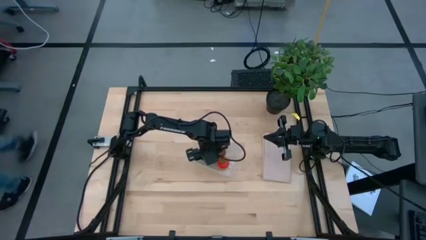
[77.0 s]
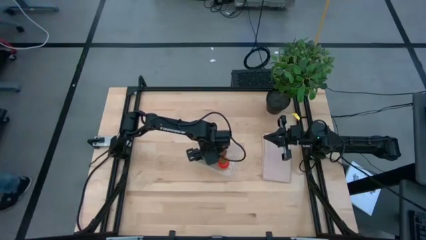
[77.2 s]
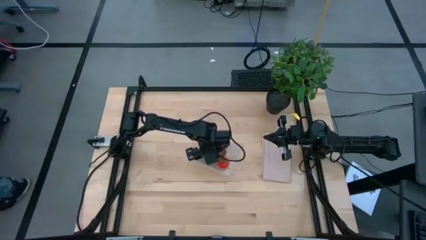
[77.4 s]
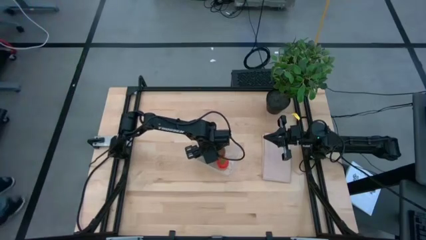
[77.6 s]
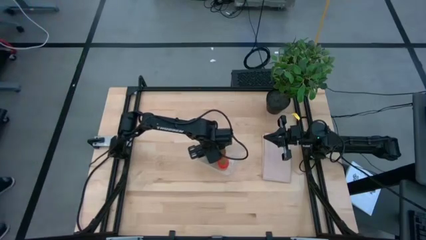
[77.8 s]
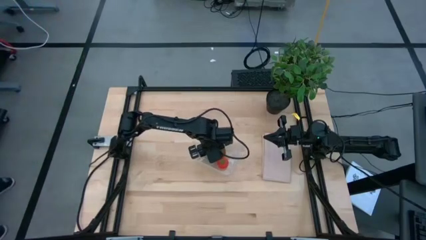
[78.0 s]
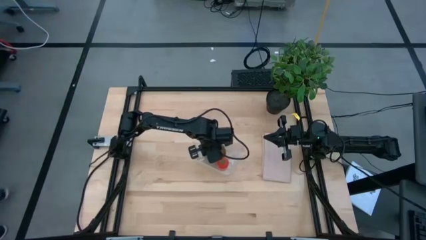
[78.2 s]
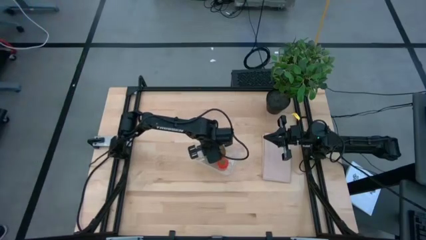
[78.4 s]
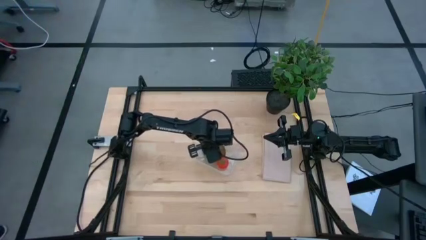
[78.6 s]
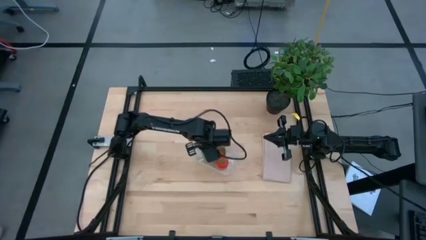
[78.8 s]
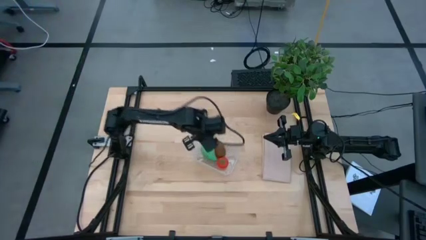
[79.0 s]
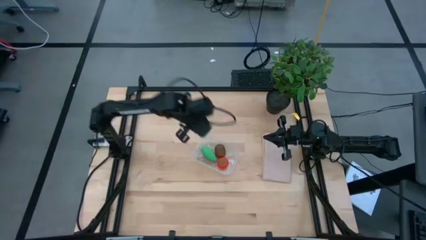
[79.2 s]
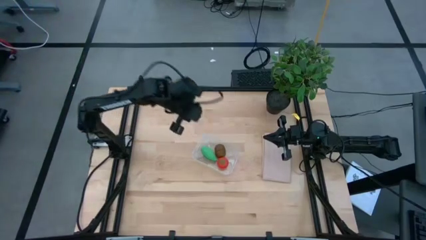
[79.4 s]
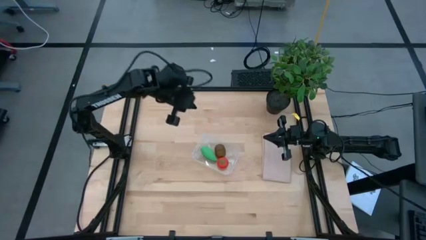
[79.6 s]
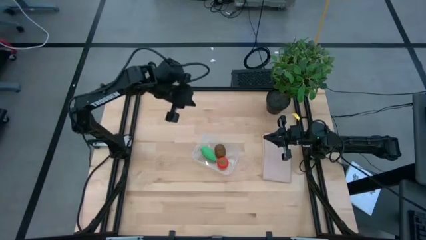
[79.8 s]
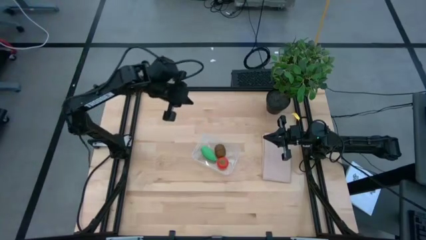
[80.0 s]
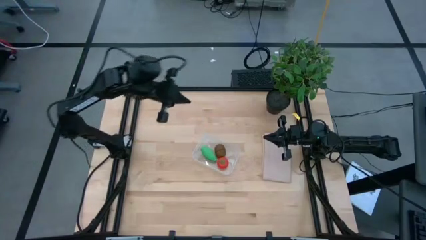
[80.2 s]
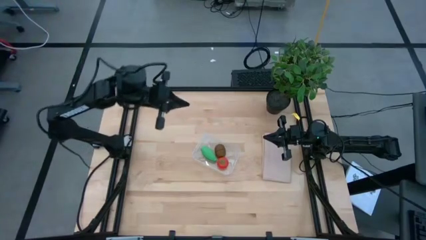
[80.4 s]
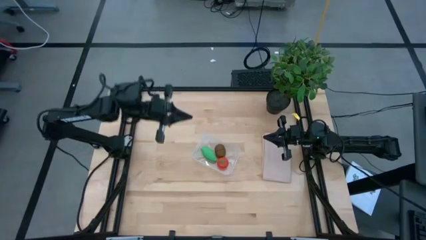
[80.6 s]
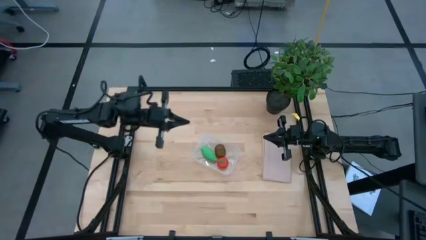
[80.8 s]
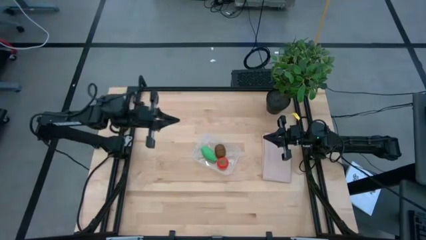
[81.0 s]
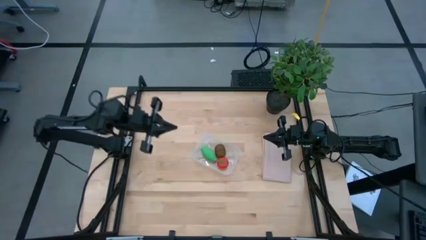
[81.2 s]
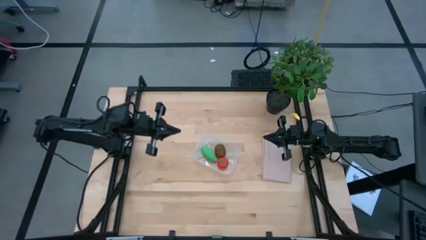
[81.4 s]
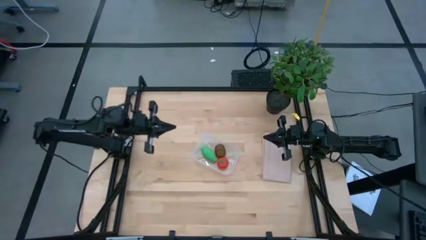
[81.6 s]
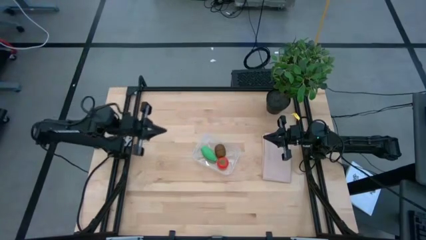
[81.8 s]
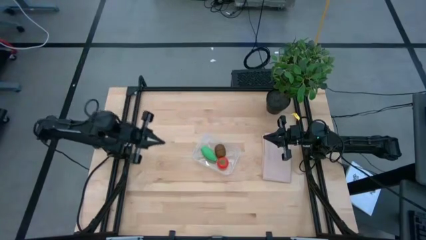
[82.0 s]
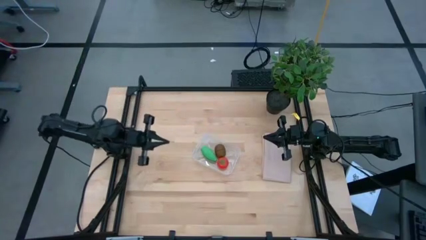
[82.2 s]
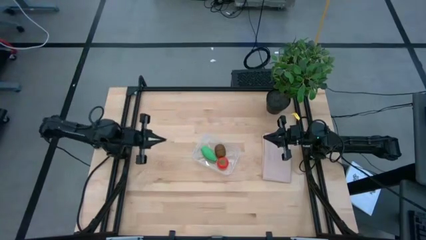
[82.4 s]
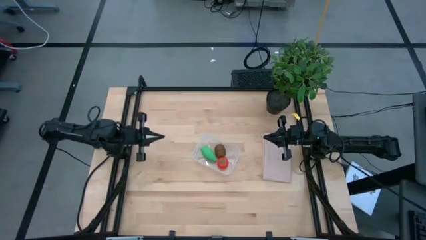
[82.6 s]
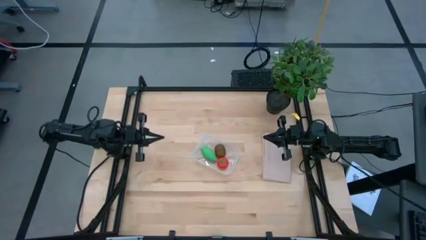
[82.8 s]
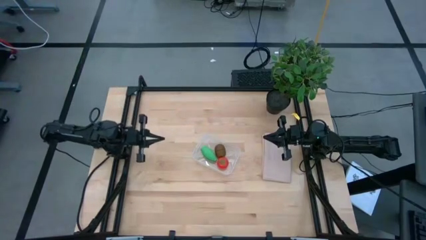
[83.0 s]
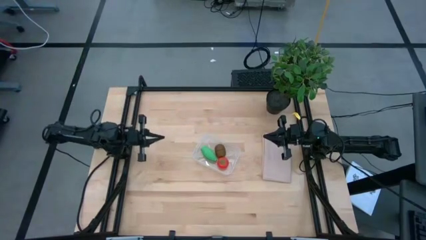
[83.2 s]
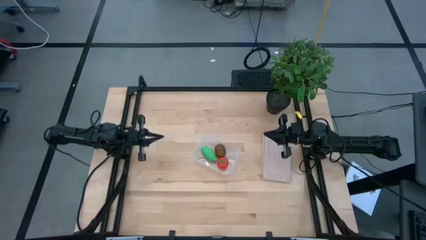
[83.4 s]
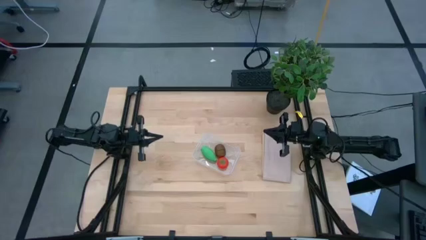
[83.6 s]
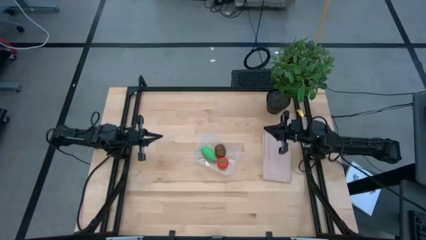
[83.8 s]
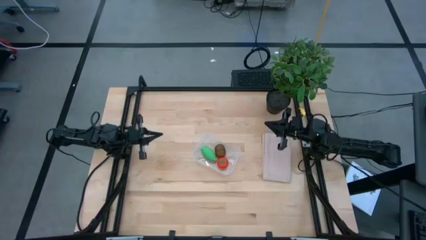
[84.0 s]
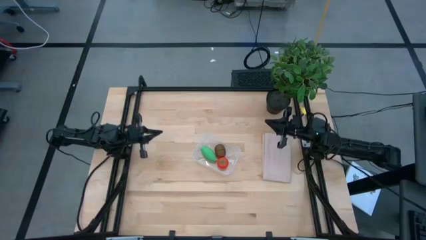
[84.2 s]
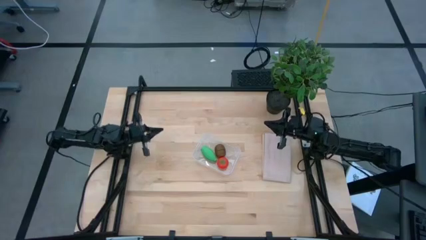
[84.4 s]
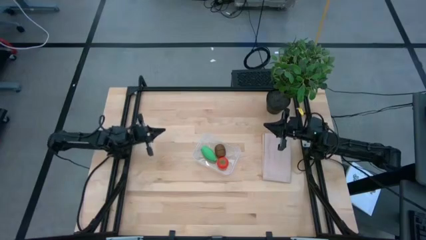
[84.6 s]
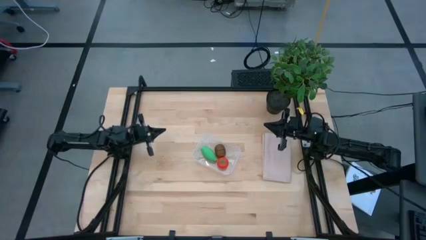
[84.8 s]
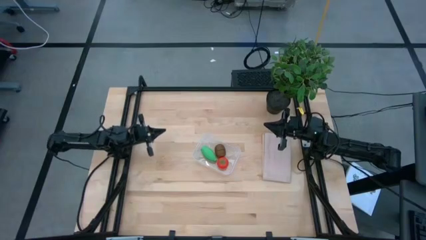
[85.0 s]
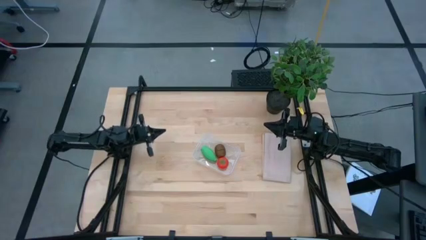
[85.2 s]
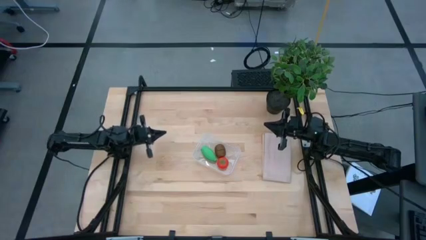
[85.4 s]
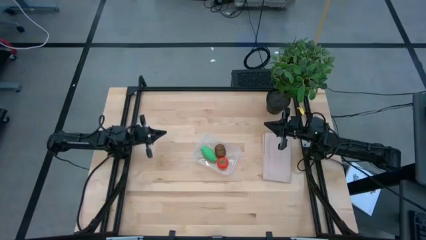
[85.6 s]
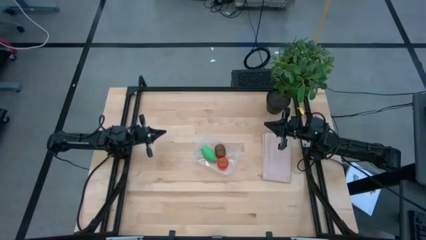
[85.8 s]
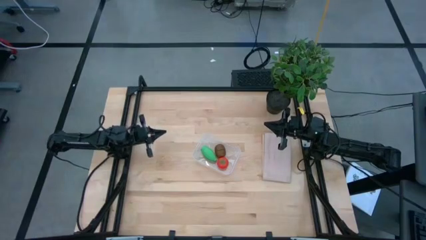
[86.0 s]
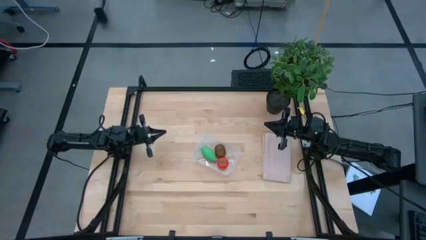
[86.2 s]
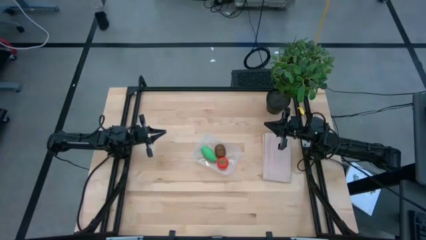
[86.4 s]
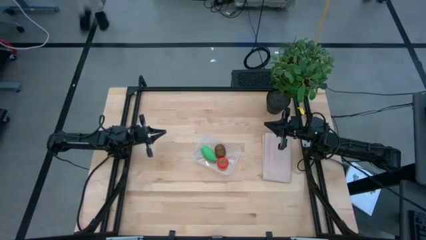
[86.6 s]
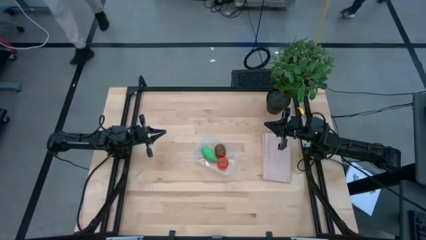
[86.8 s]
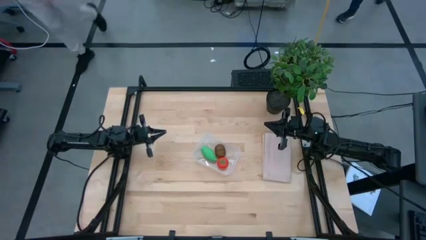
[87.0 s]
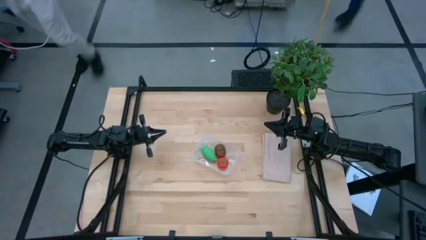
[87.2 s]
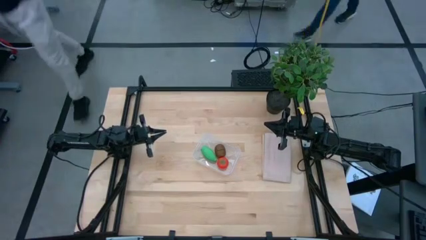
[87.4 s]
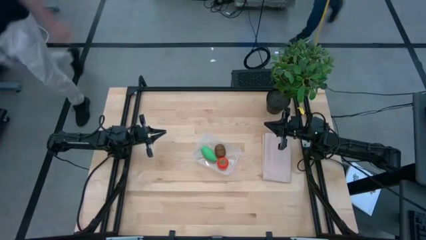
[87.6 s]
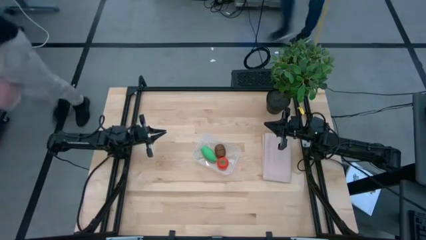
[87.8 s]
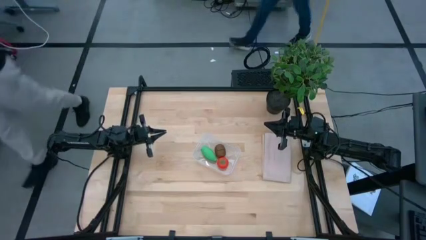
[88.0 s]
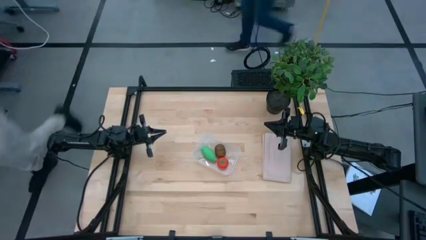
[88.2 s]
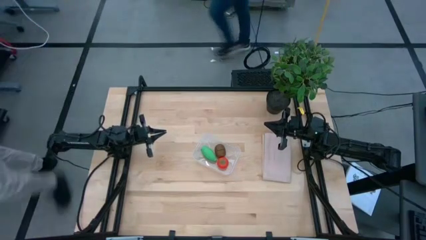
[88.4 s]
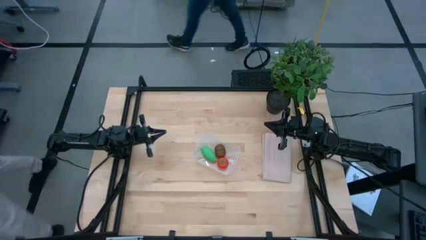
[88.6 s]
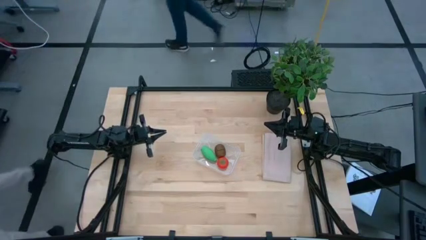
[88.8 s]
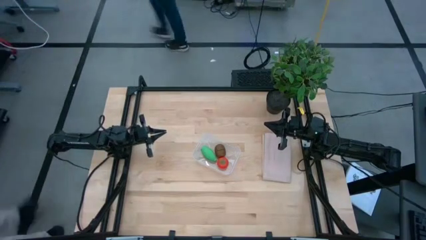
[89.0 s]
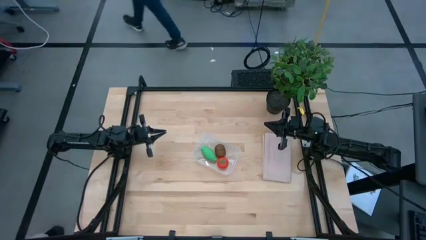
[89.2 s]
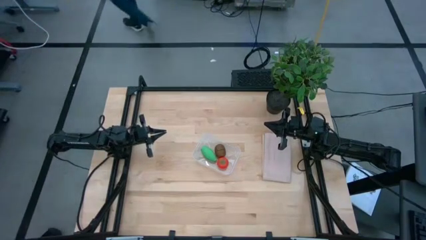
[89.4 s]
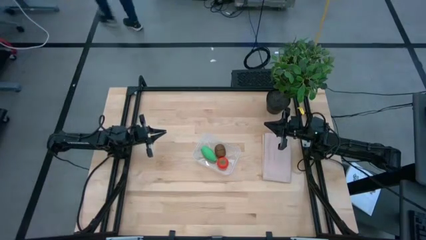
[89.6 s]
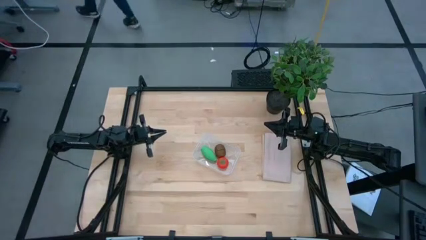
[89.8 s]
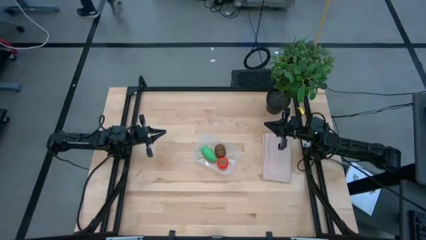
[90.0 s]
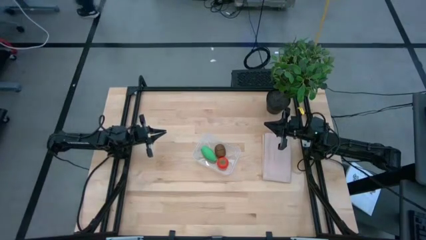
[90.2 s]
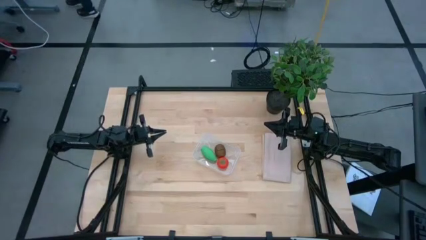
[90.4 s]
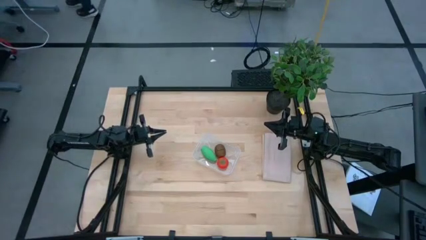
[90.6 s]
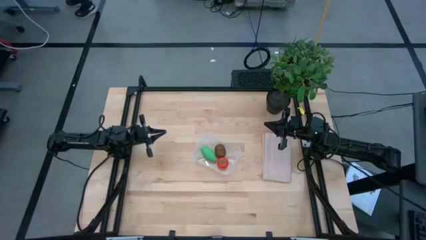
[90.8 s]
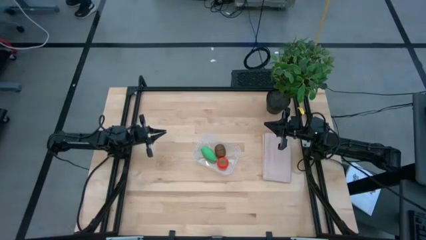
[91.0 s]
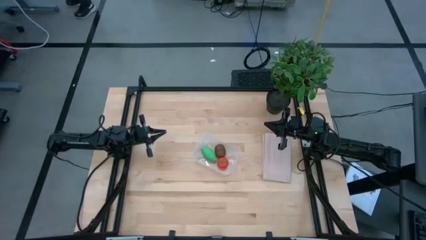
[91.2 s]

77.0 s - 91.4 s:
Task: Pick and placing Produce into tupperware
Return to Home Position

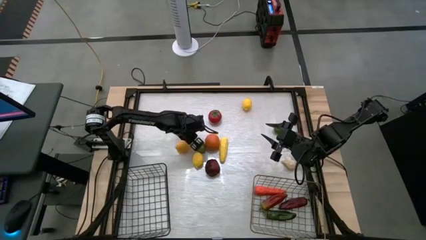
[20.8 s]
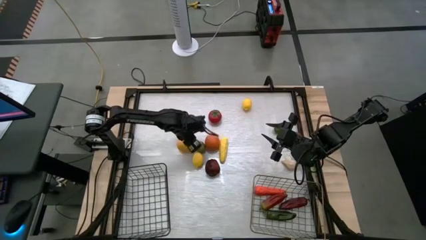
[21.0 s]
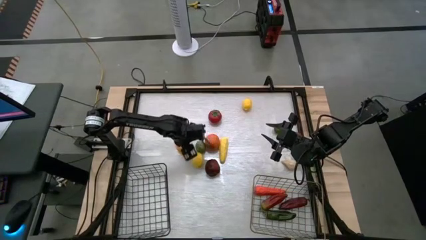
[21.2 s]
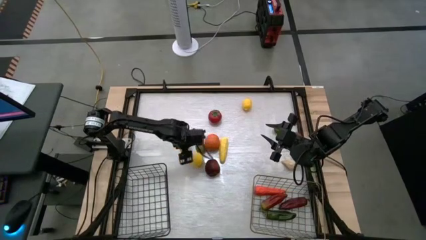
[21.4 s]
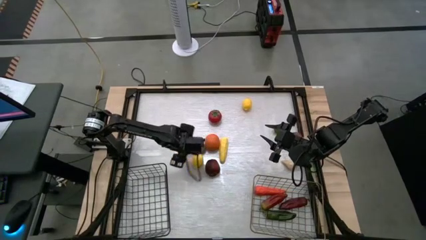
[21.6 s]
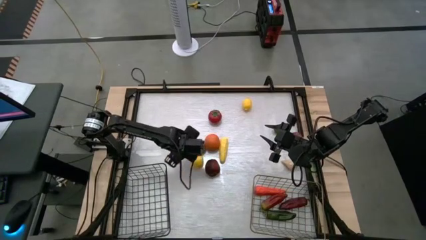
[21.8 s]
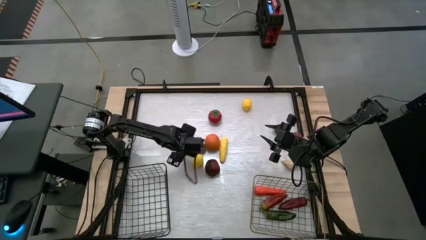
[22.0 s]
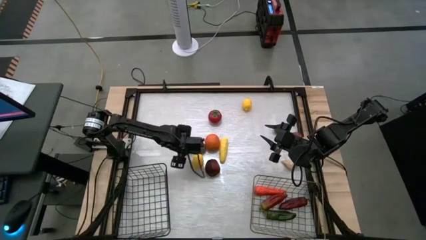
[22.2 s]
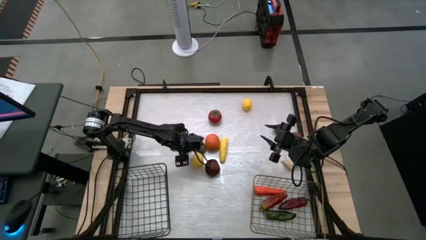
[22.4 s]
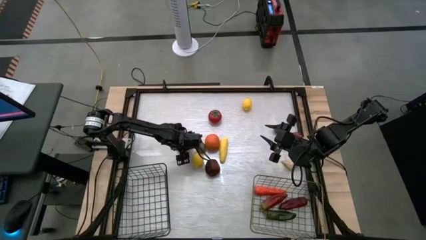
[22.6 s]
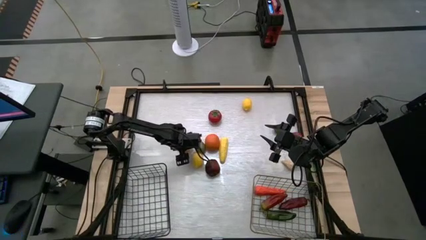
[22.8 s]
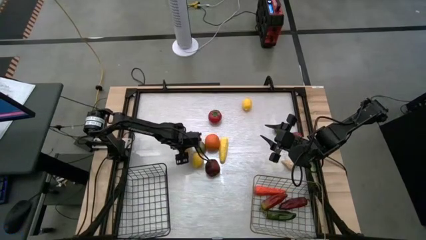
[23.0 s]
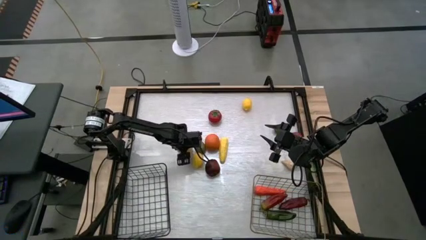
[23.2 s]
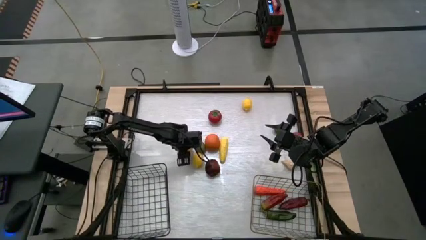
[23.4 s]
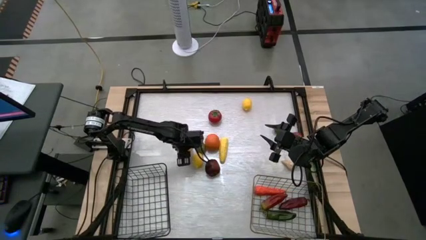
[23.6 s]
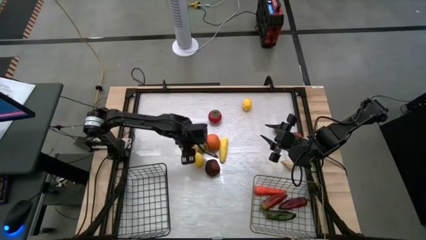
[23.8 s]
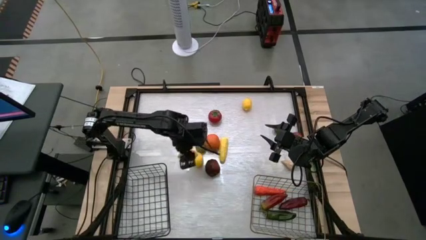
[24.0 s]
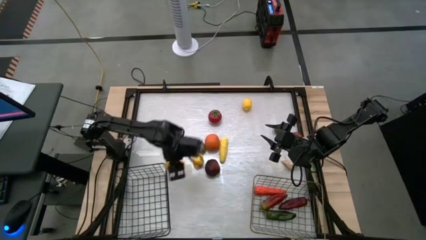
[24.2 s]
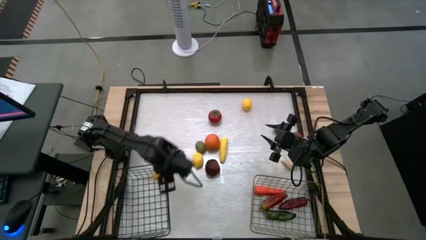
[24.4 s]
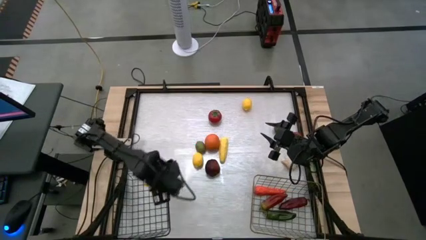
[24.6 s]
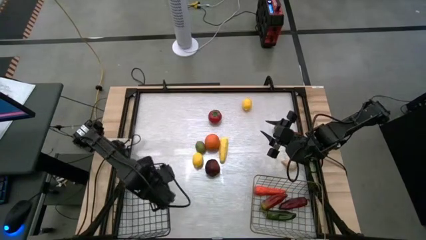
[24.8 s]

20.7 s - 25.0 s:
Task: Sort produce into baskets
Put the bottom left lemon into the black wire basket
